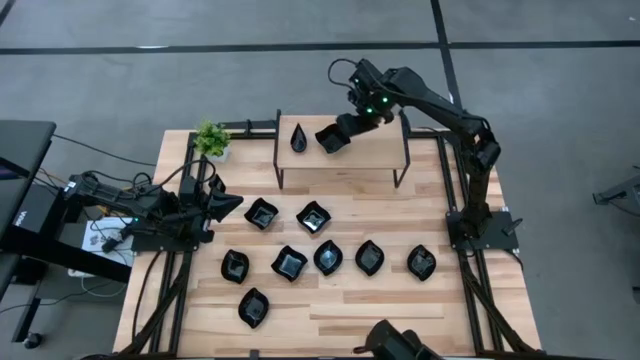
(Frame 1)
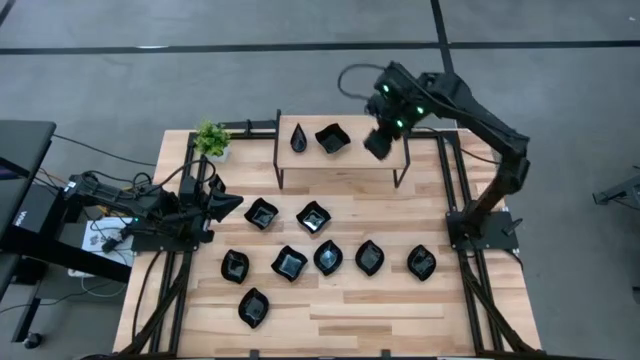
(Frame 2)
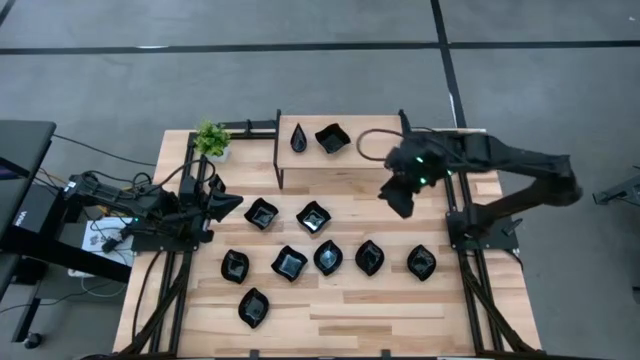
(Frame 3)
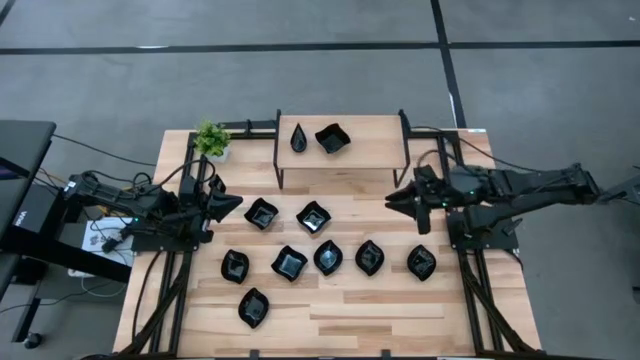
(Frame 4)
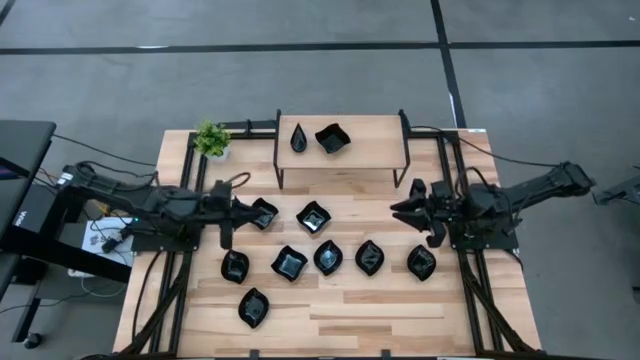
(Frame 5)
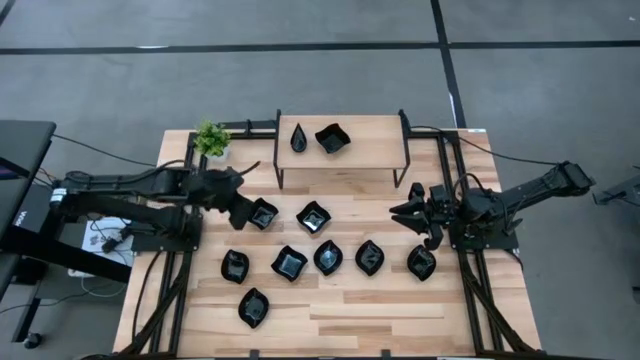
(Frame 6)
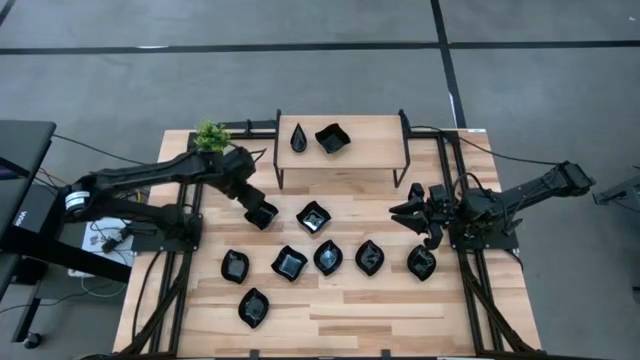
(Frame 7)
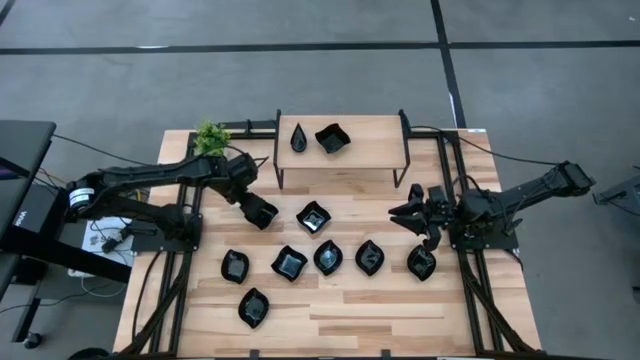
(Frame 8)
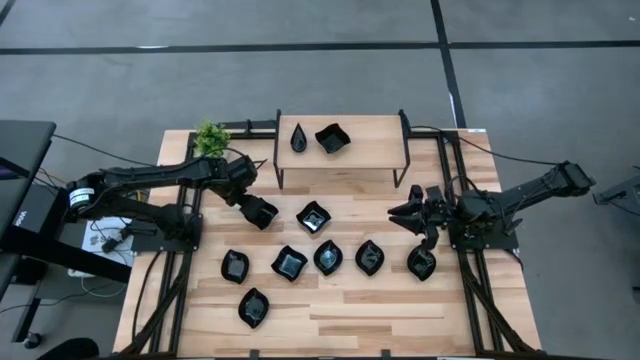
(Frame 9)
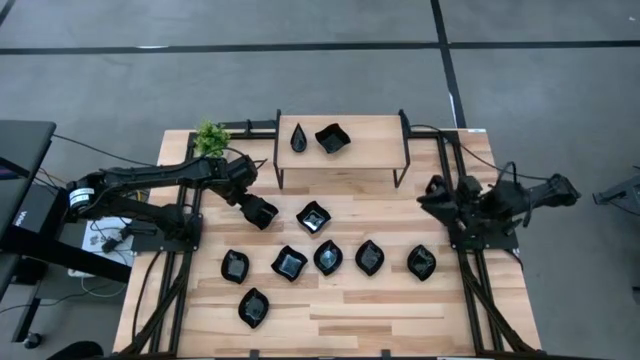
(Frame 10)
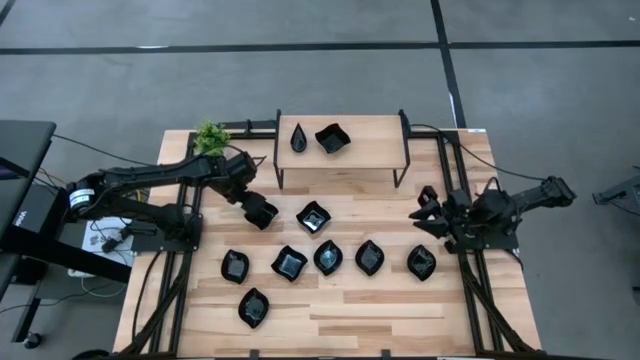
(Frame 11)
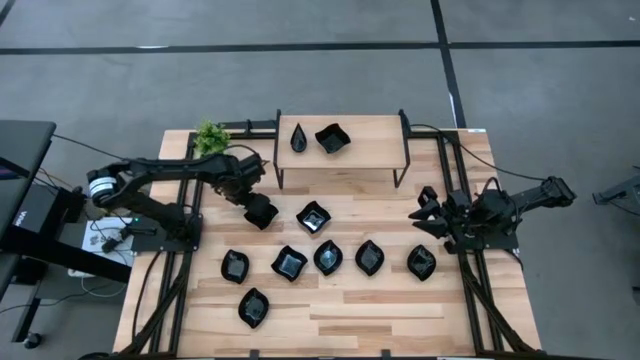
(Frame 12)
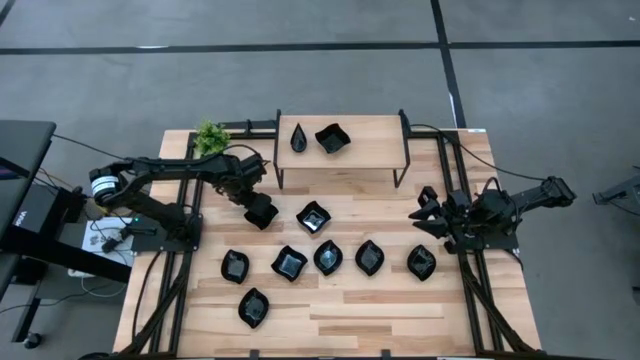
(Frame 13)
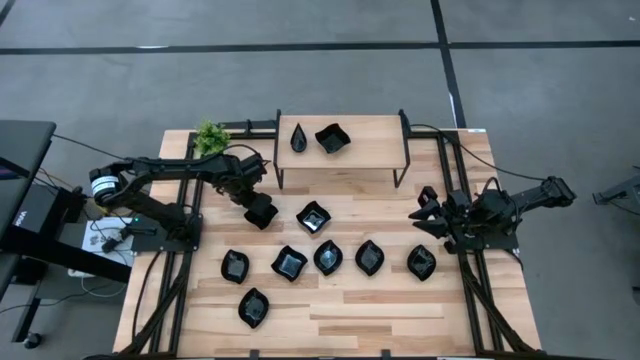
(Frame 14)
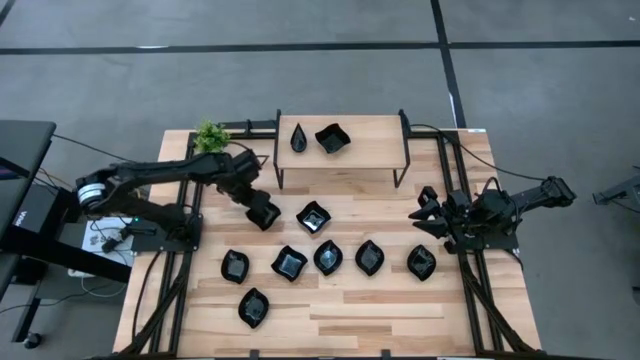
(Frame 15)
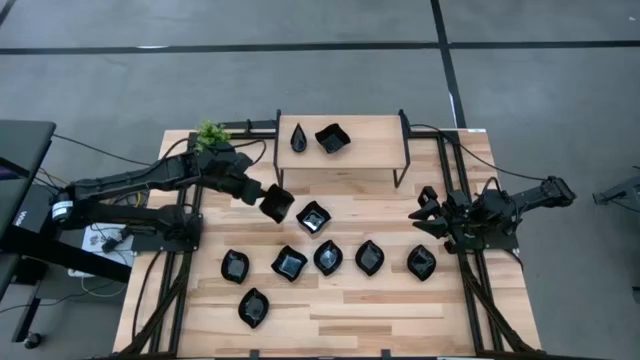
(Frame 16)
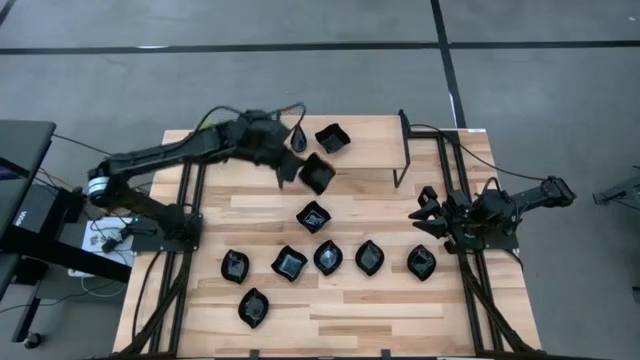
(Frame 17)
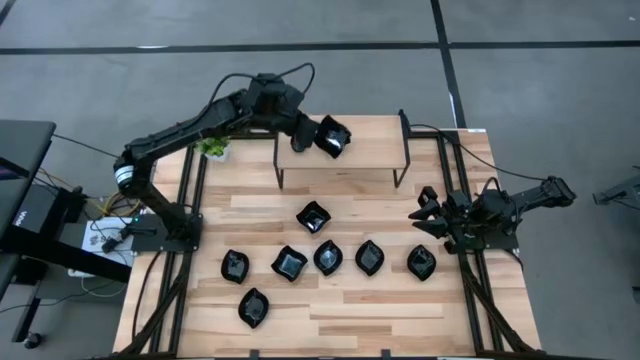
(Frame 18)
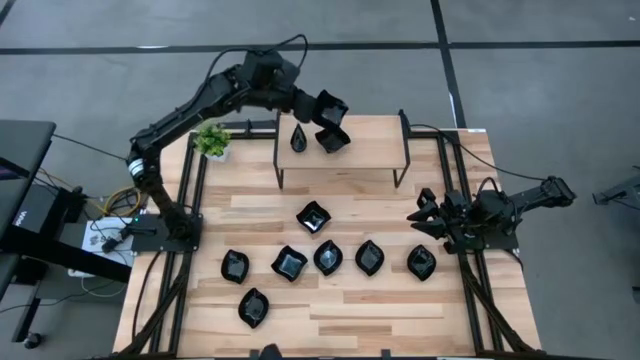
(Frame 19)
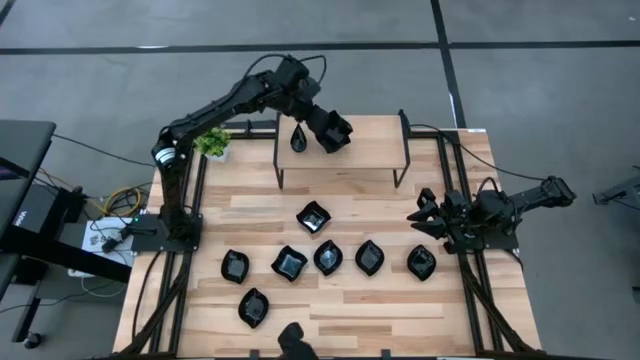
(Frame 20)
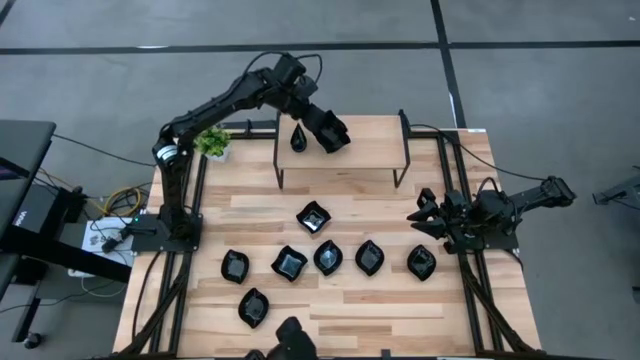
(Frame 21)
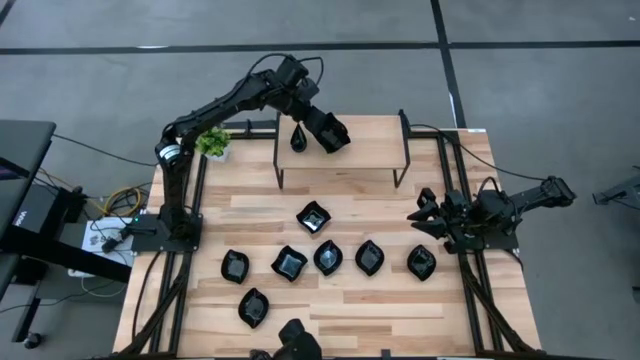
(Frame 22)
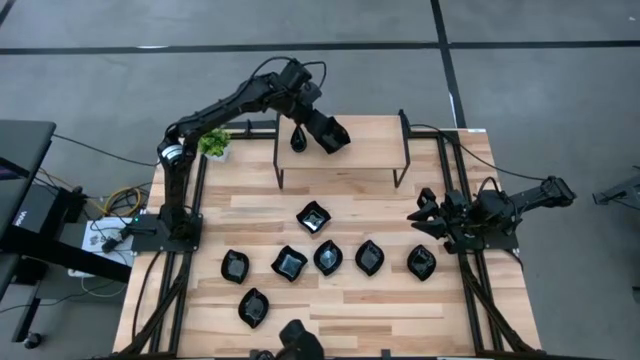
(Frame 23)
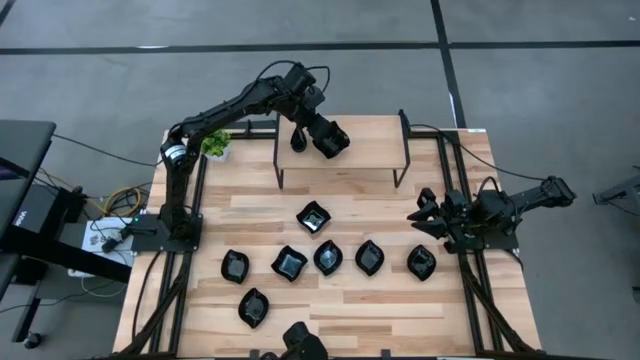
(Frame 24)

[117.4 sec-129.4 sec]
Task: Pick & Place Mini shaped plates
Stack the black distorted square plate on top of the black distorted square plates on the shelf

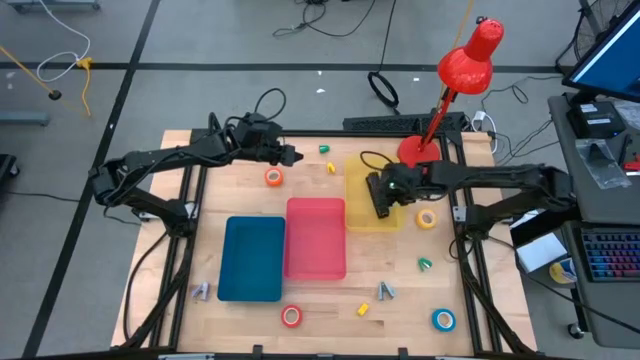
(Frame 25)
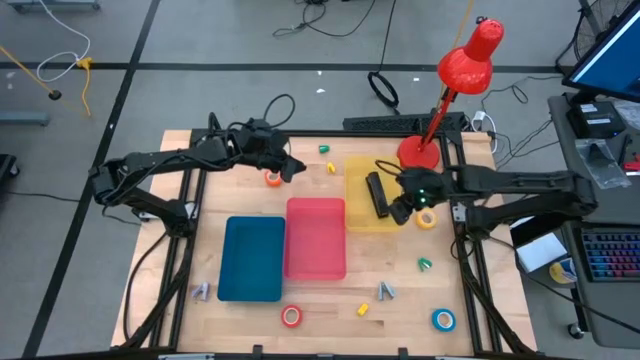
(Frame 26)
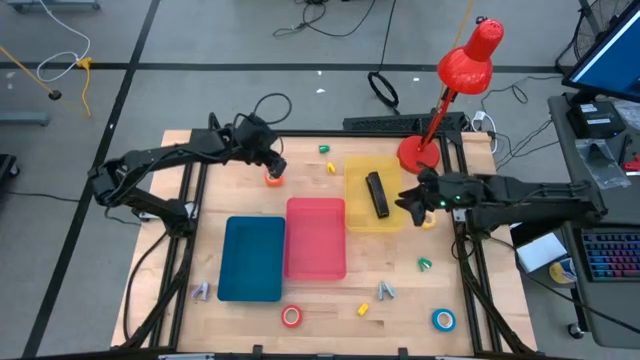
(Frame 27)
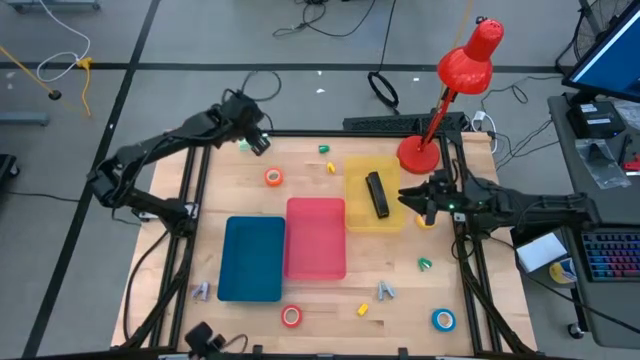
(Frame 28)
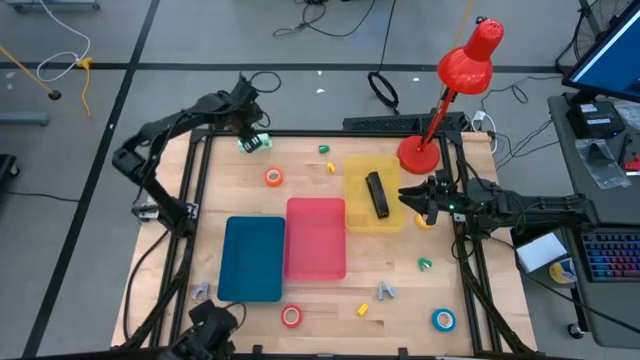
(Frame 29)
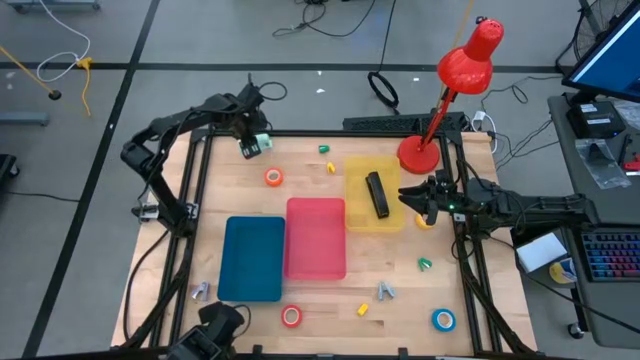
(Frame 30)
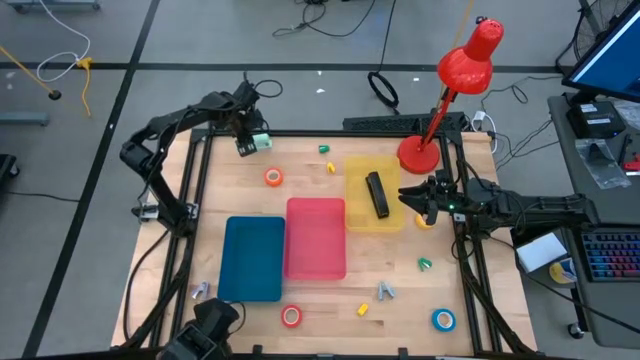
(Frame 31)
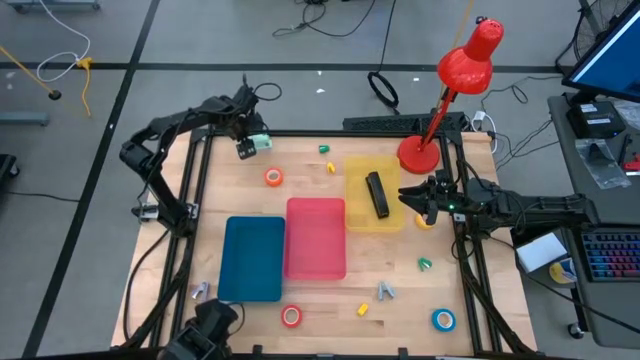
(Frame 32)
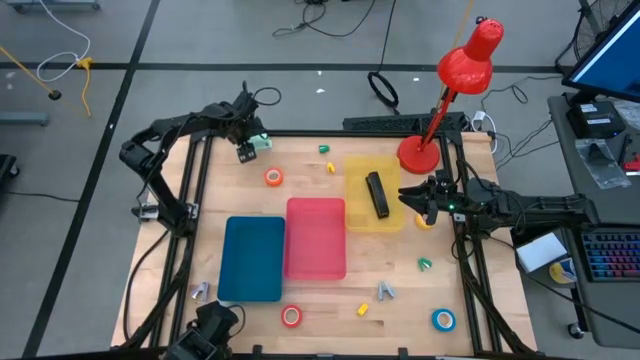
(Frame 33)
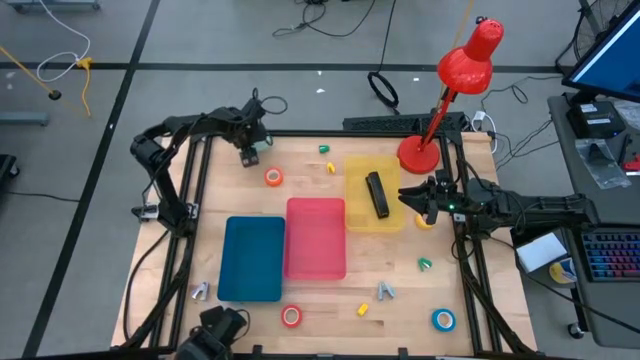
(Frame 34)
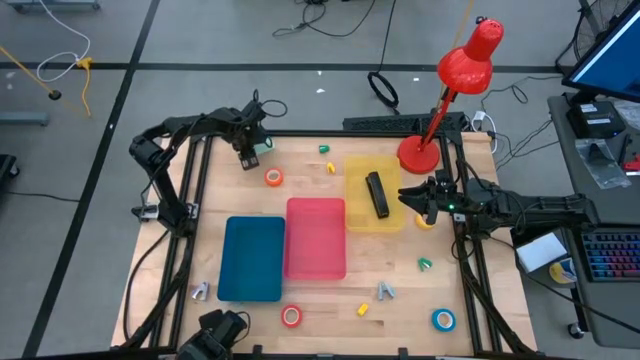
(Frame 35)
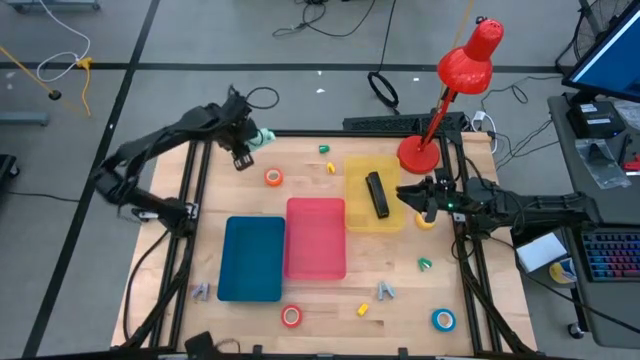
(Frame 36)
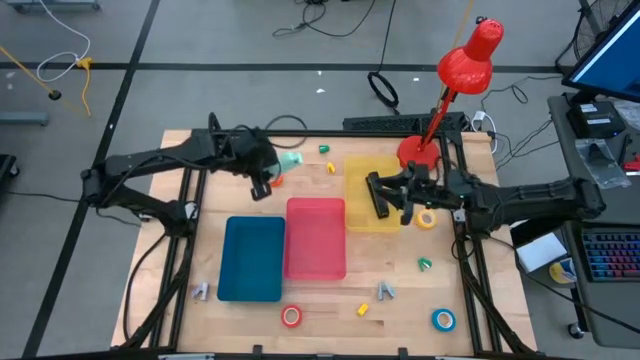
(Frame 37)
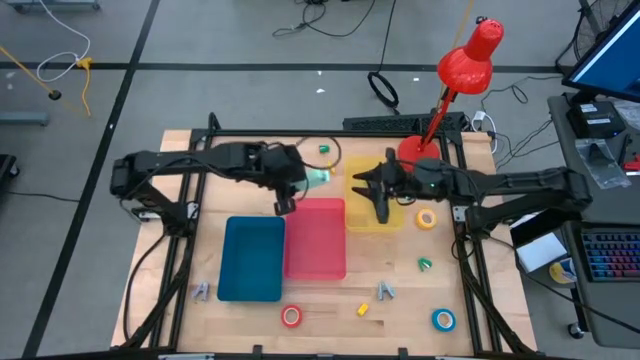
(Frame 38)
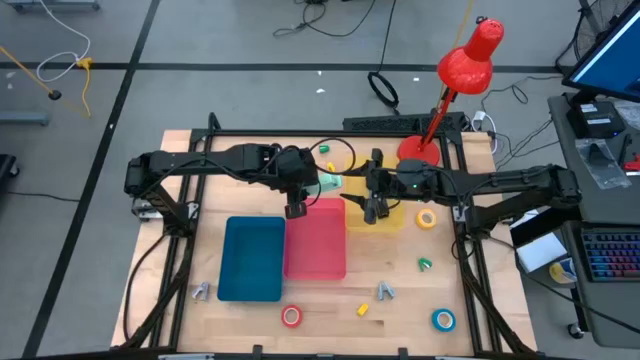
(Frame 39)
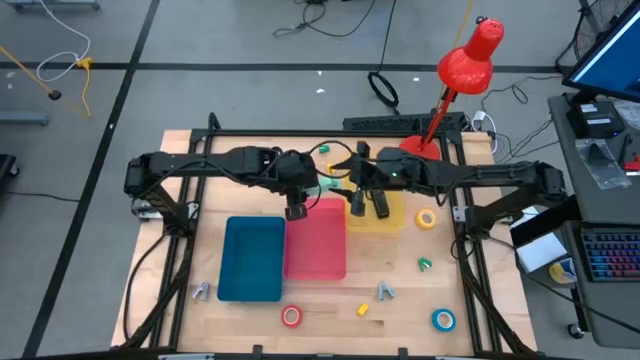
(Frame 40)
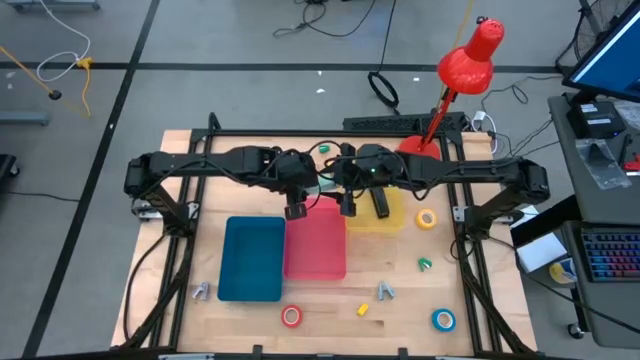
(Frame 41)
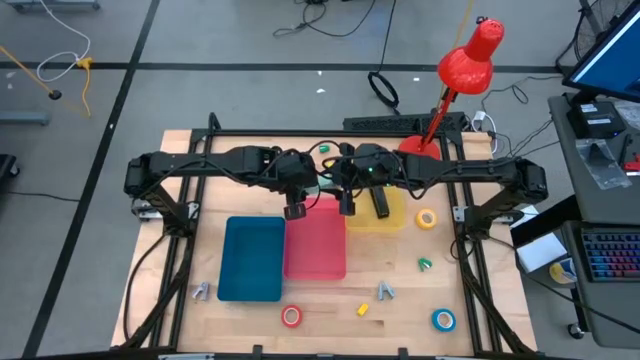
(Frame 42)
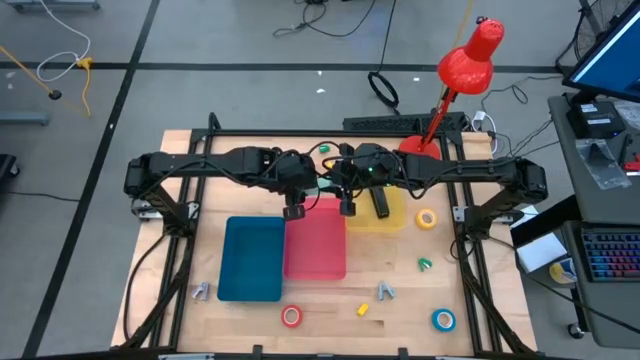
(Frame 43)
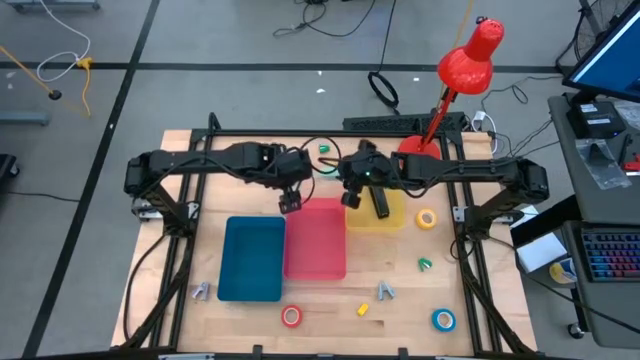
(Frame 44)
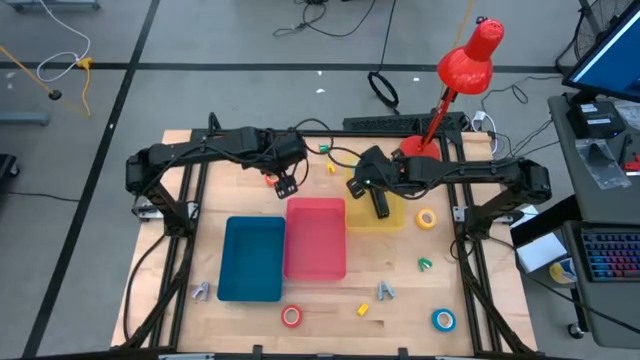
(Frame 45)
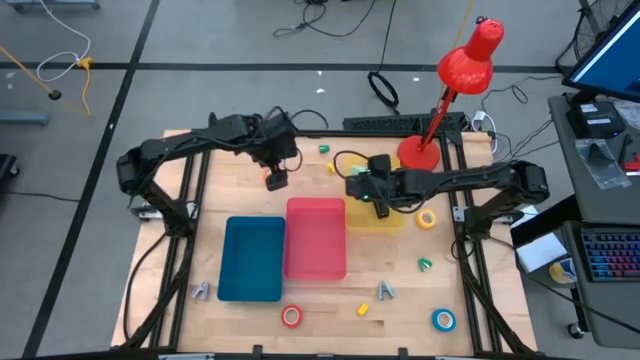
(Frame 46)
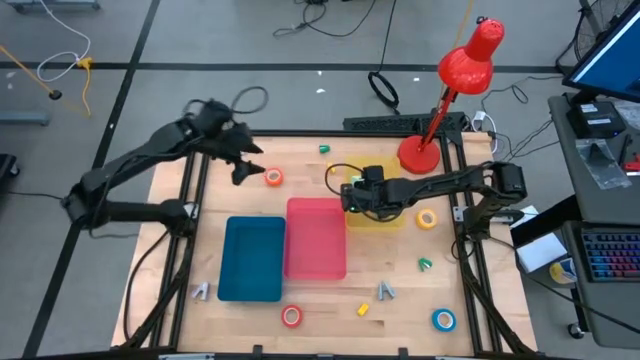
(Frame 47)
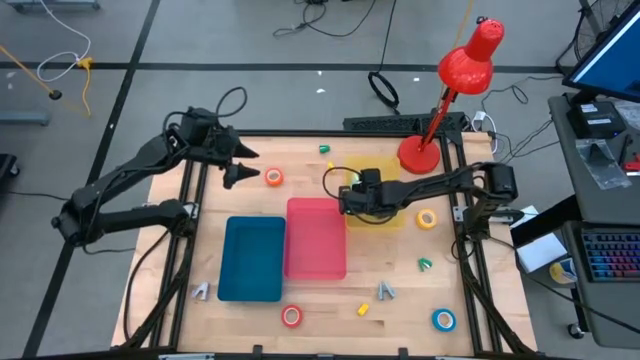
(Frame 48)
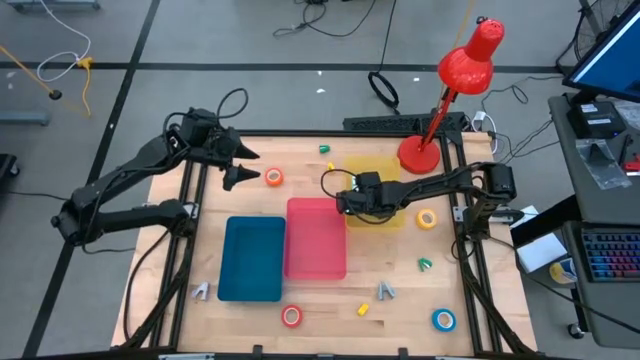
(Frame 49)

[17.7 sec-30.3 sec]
Task: Pick and place Stapler, Stapler remover, tape
Put the blue stapler into the yellow bin
